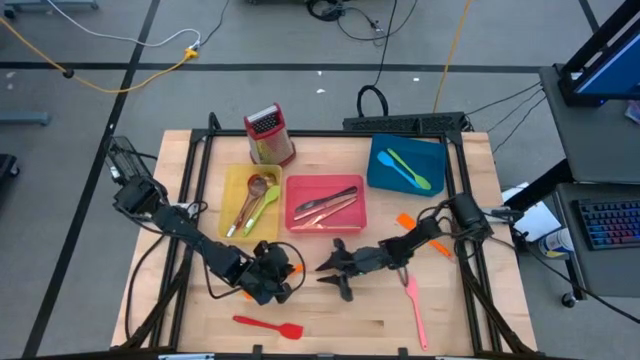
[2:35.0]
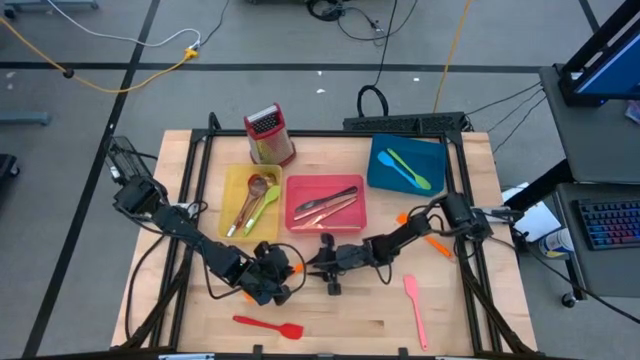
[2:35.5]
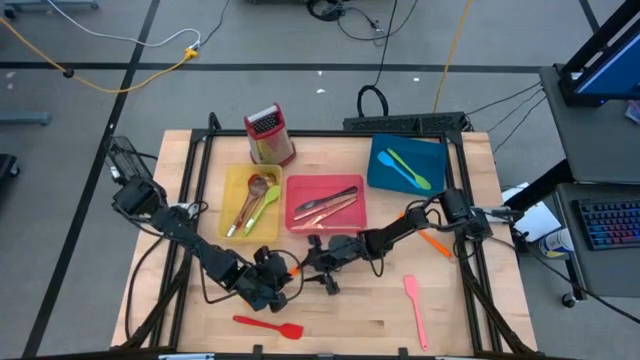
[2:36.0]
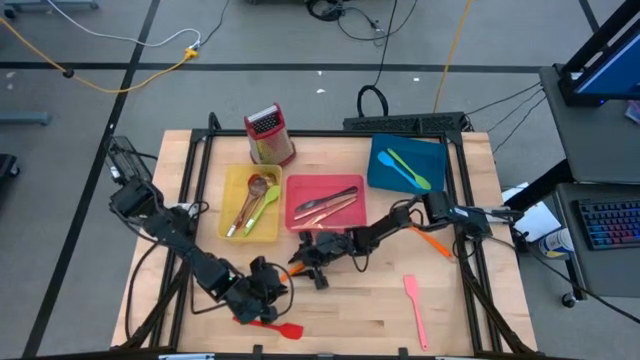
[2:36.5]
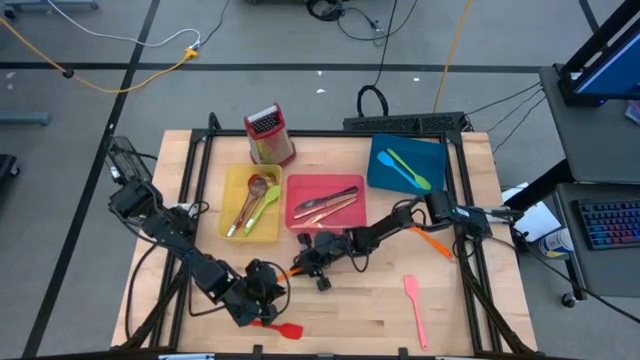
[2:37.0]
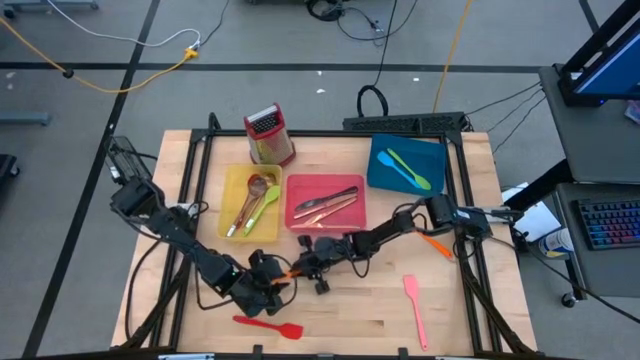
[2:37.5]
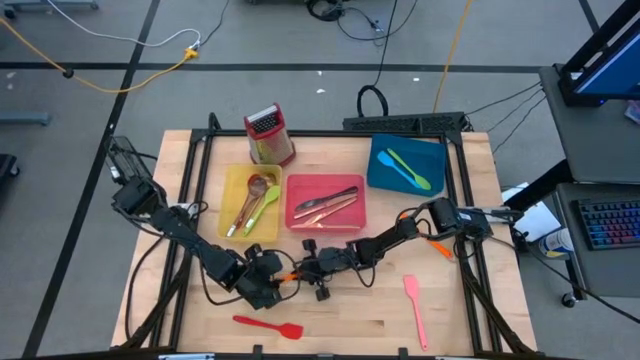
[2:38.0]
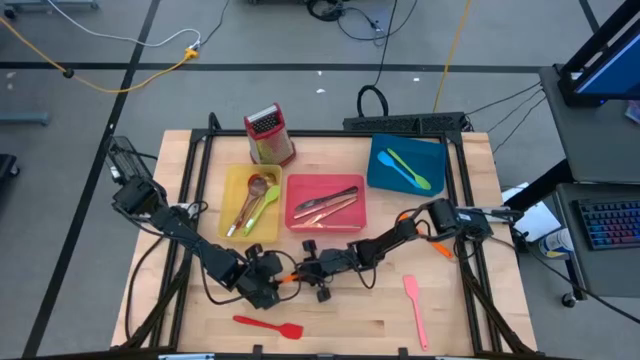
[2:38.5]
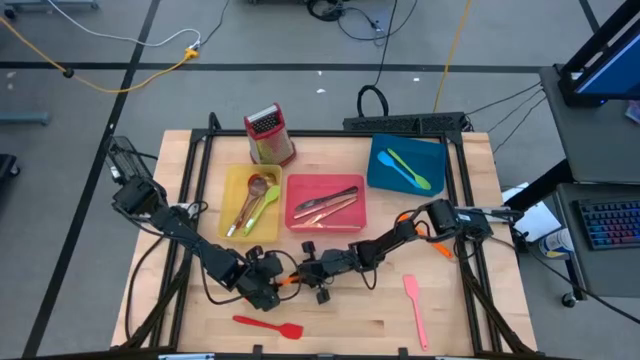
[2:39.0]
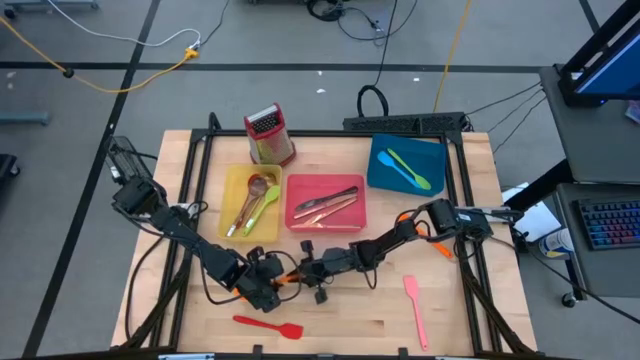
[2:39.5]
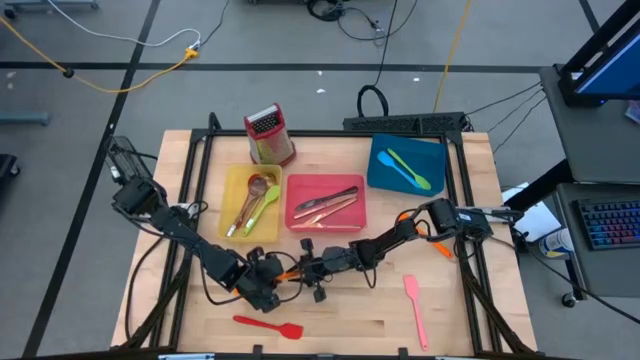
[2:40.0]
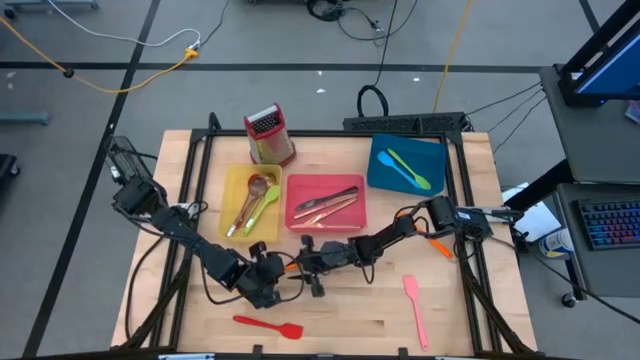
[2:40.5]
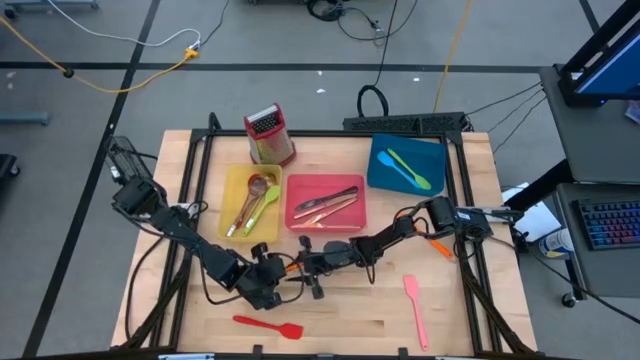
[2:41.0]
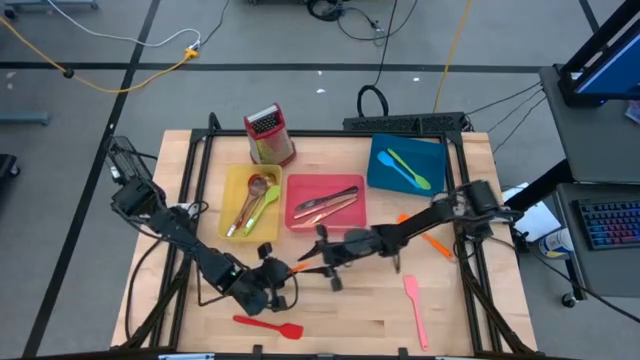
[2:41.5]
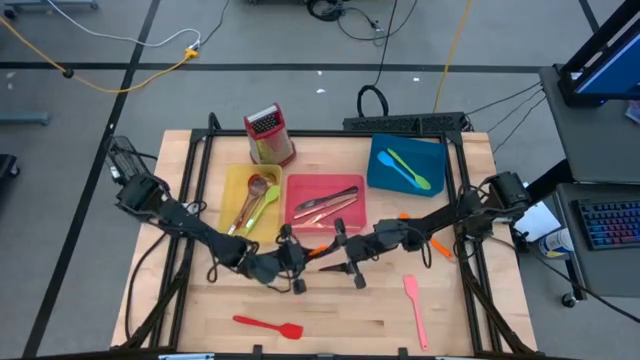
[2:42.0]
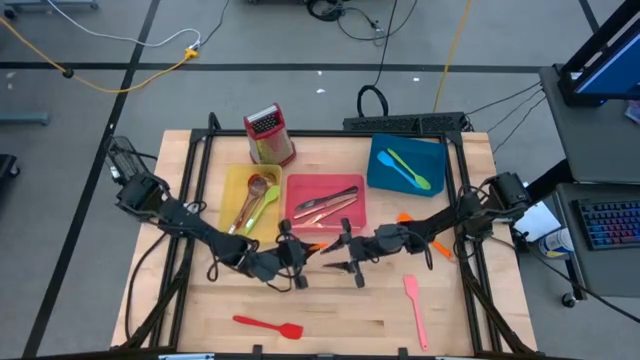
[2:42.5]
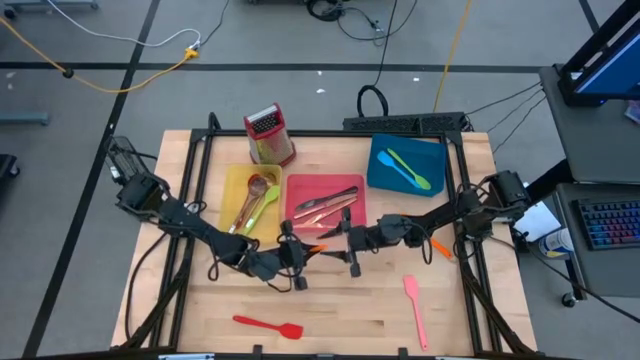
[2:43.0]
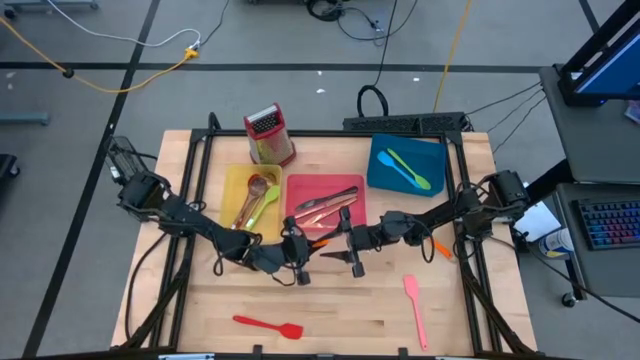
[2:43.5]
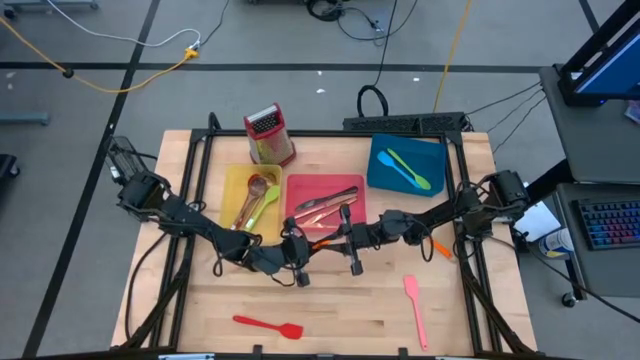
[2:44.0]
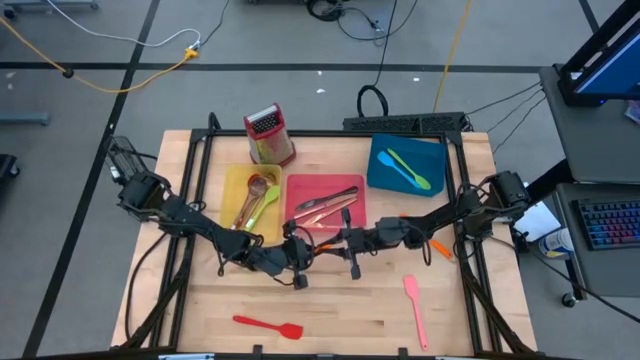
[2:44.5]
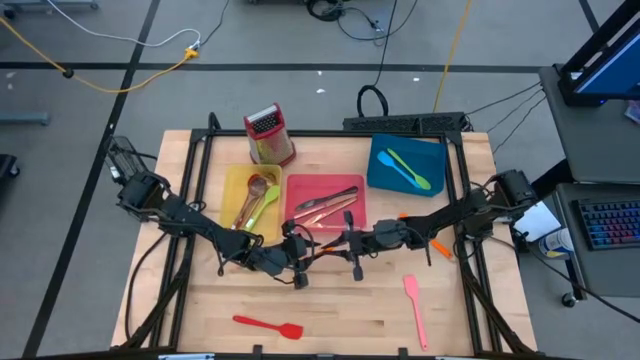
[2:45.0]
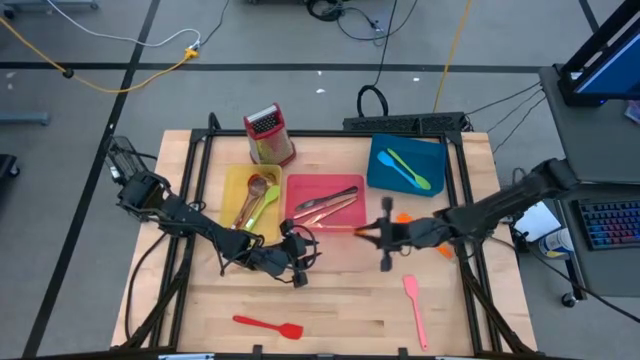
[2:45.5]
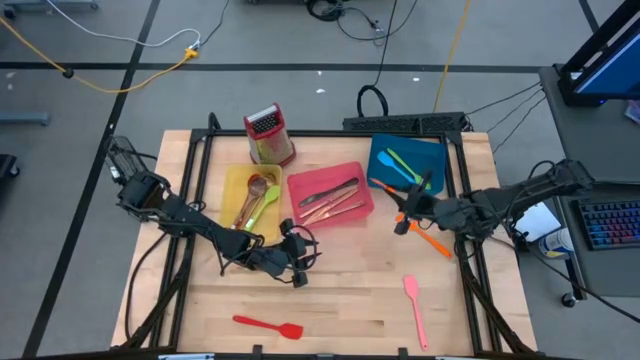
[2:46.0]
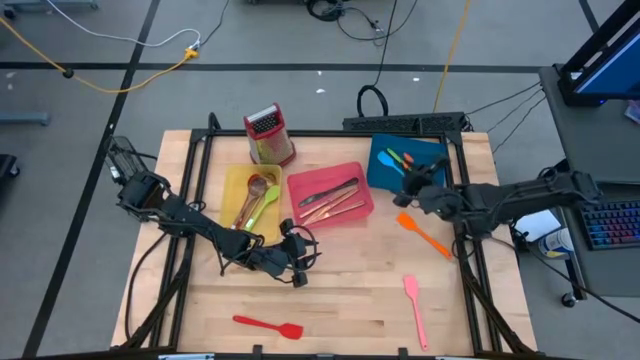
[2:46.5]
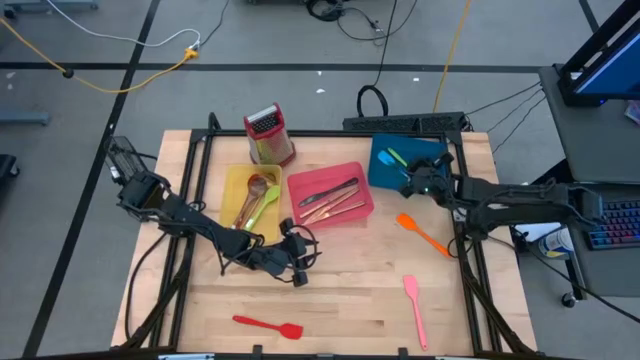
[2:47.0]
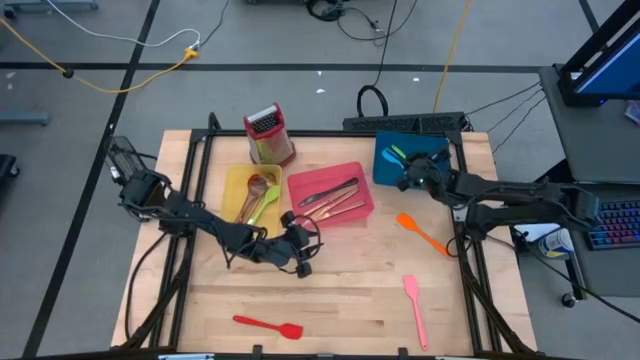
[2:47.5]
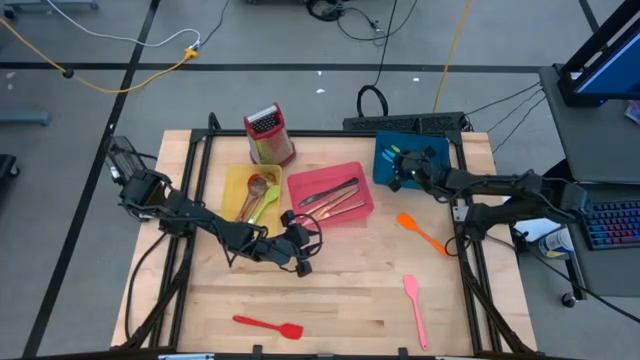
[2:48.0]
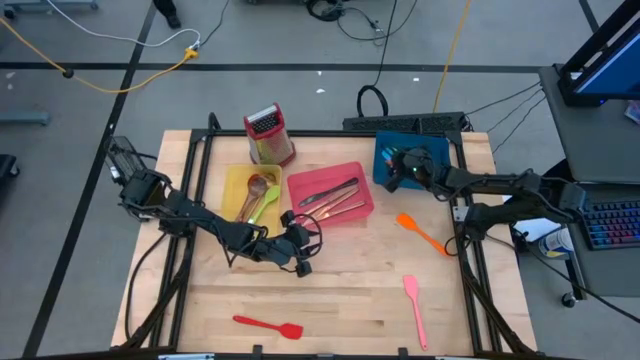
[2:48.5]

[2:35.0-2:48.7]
Task: Pick & Place Kitchen Items
Put the bottom orange spatula into the blue bin

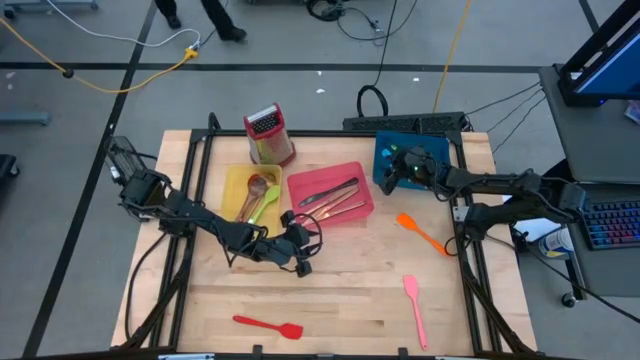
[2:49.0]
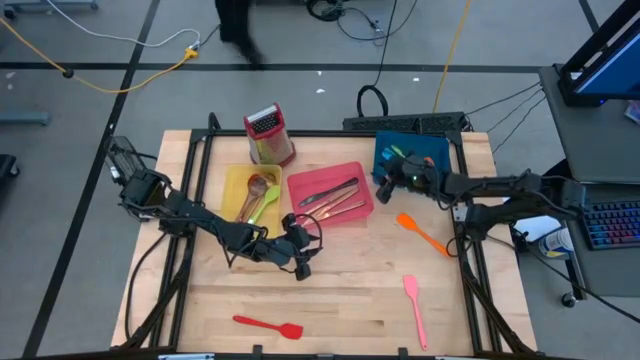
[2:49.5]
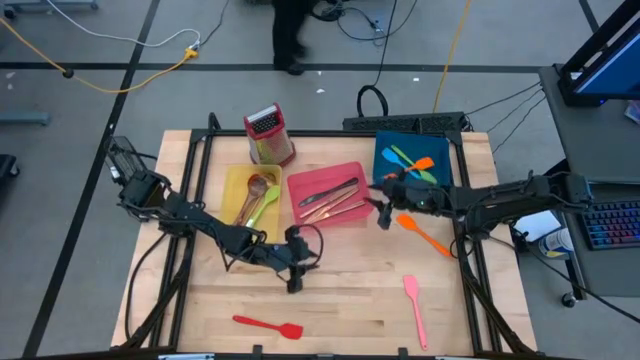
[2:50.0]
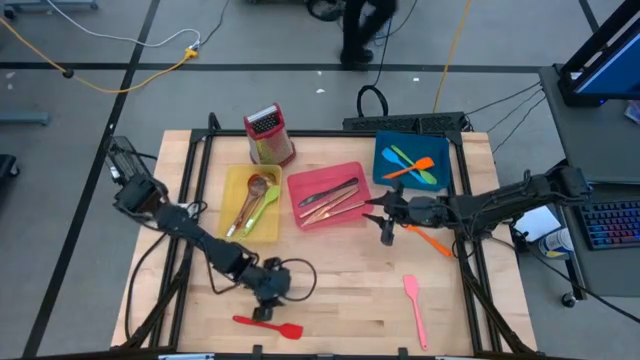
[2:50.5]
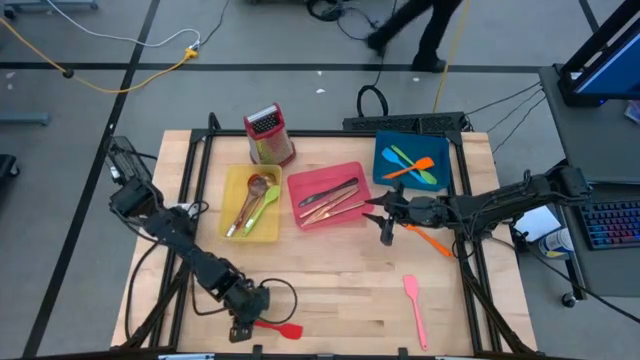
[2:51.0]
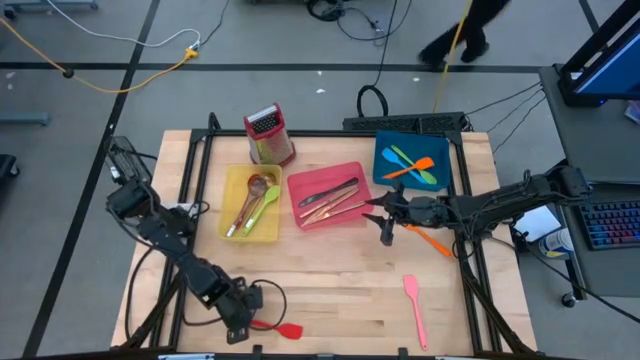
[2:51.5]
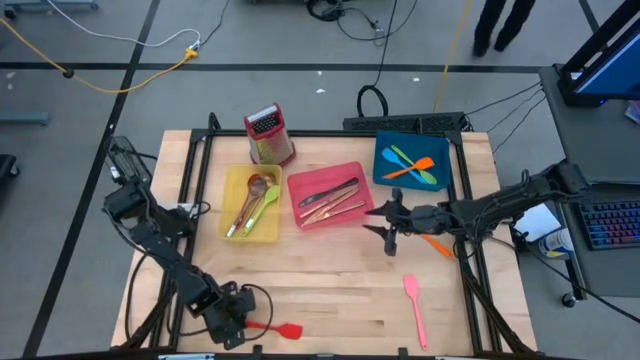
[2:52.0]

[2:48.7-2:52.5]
Put the red spatula into the blue bin

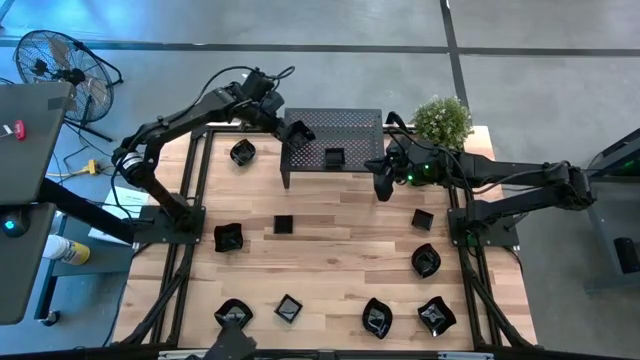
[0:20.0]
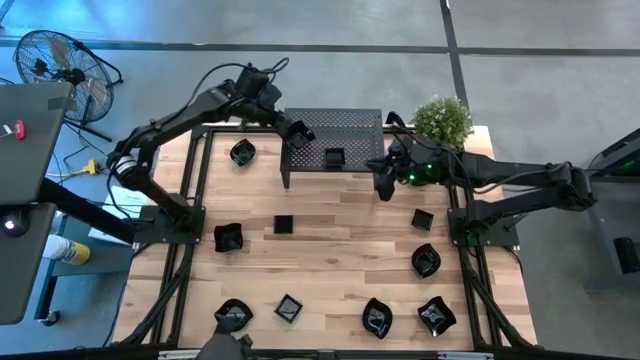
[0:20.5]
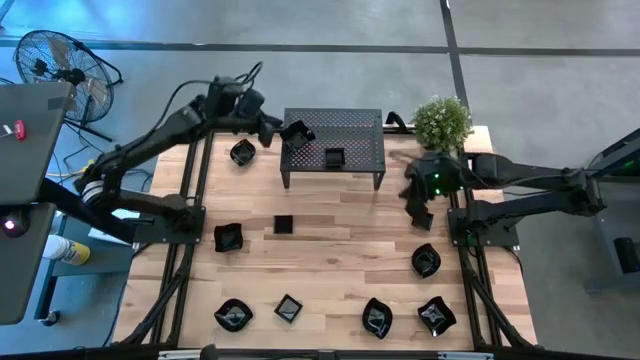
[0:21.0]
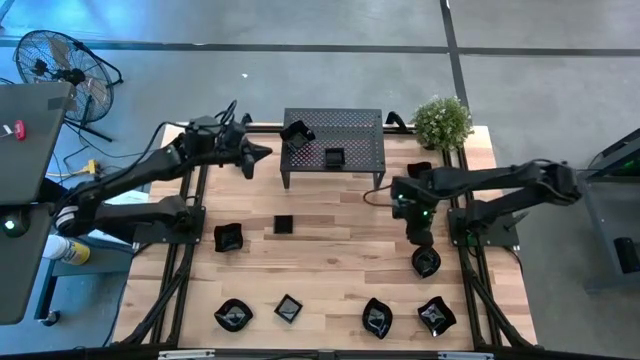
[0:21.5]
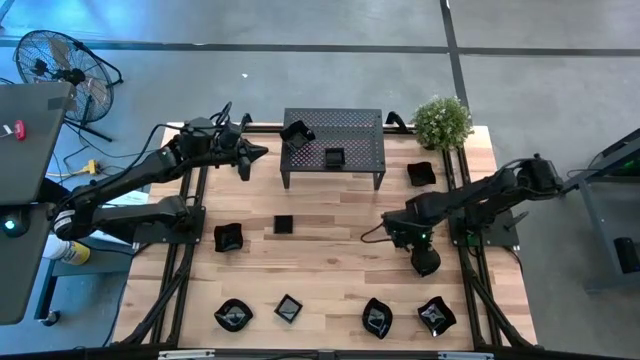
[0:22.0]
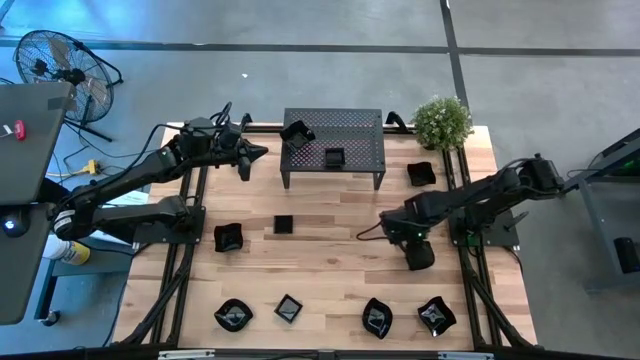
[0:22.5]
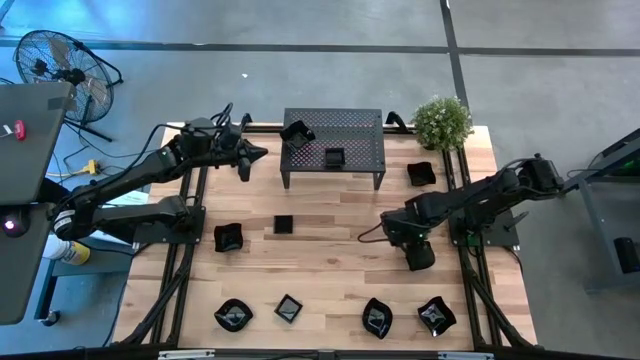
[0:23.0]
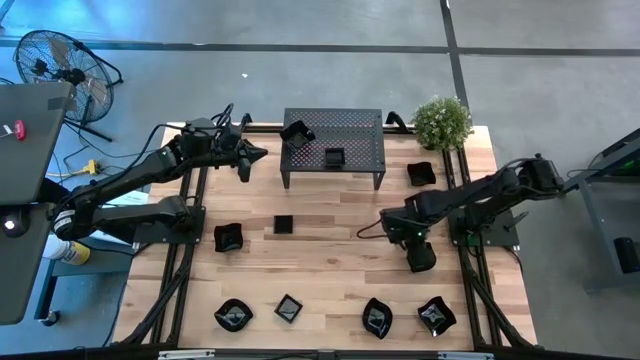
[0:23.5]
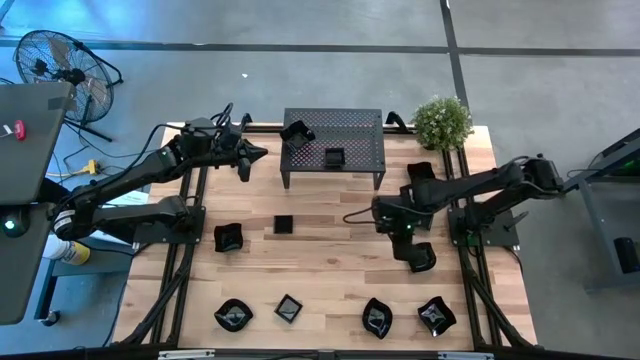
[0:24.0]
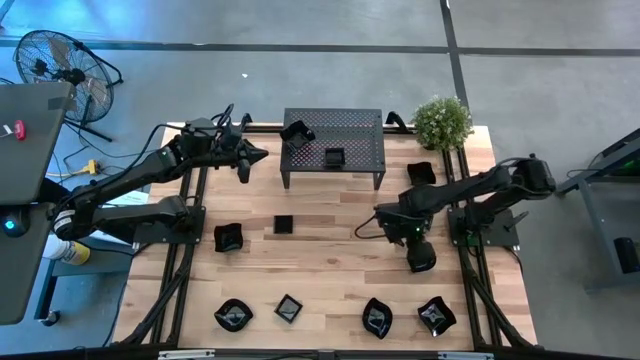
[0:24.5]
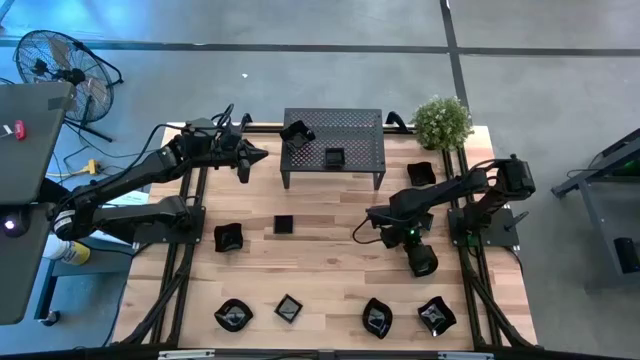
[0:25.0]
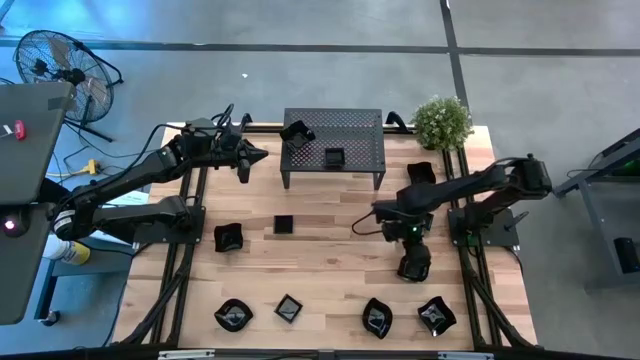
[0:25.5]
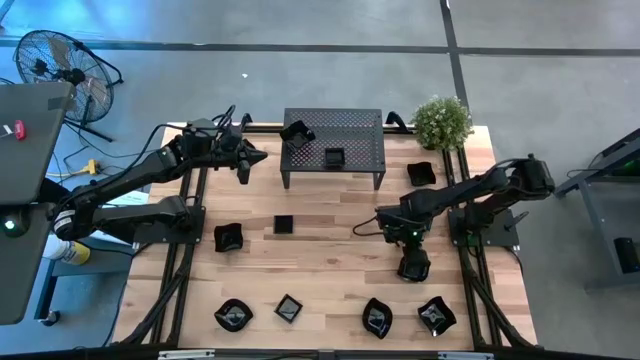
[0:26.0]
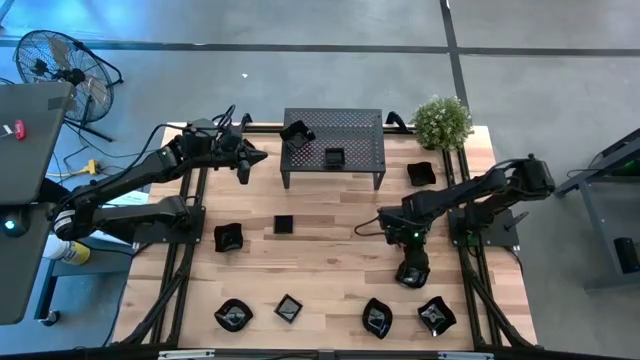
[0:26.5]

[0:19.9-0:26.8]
Task: Pick & Place Mini shaped plates
Put the black leaf shaped plate on the shelf
